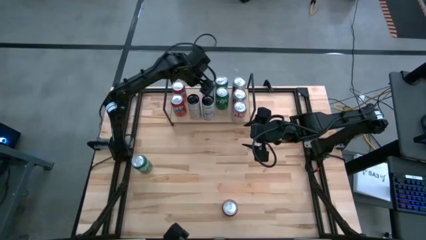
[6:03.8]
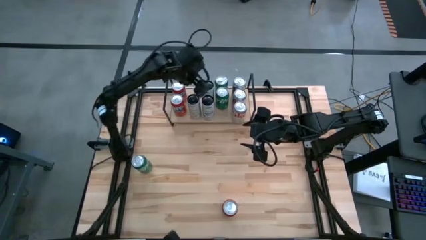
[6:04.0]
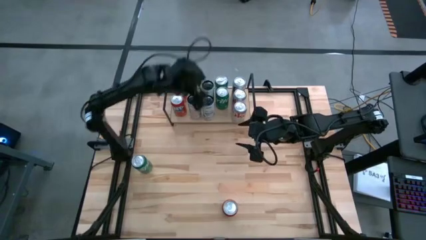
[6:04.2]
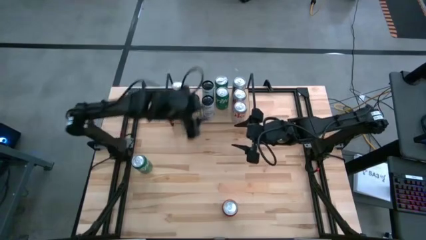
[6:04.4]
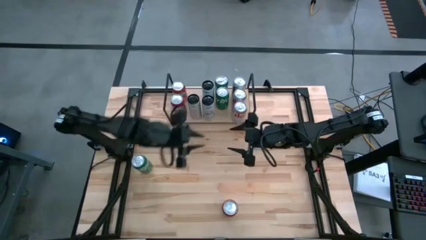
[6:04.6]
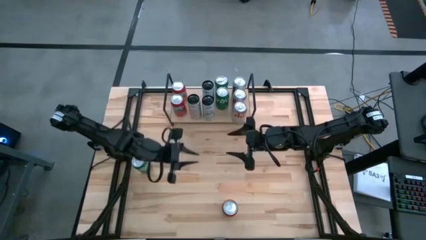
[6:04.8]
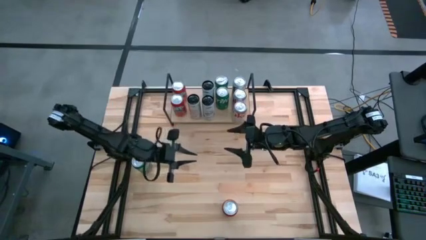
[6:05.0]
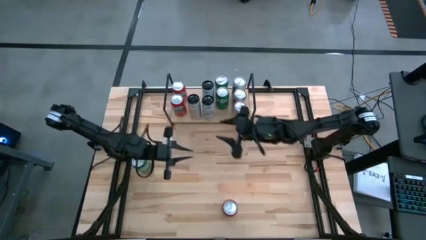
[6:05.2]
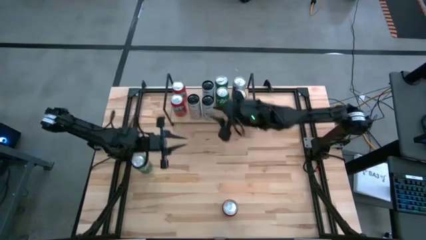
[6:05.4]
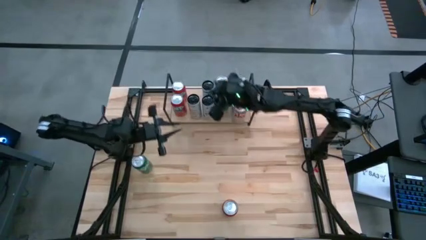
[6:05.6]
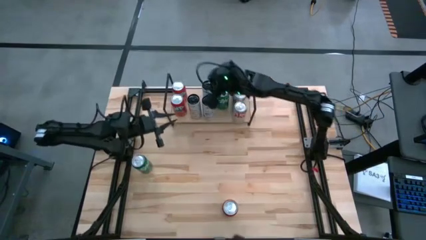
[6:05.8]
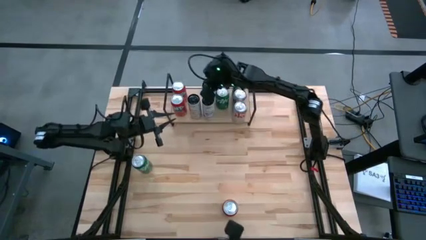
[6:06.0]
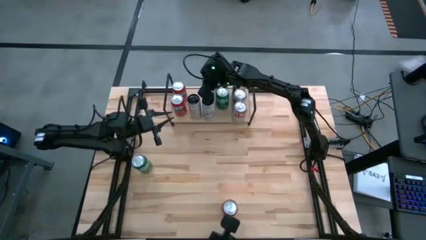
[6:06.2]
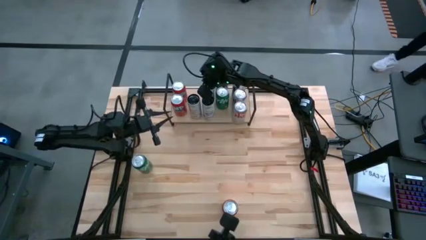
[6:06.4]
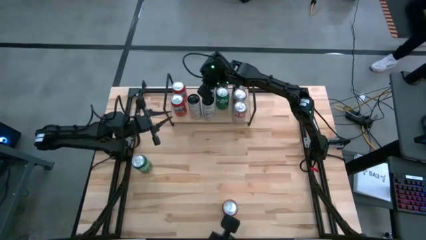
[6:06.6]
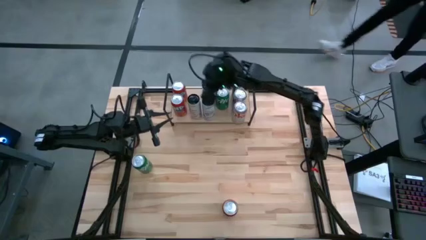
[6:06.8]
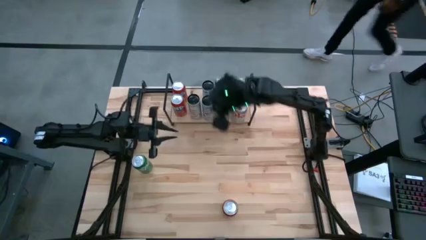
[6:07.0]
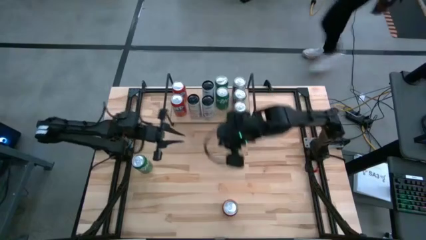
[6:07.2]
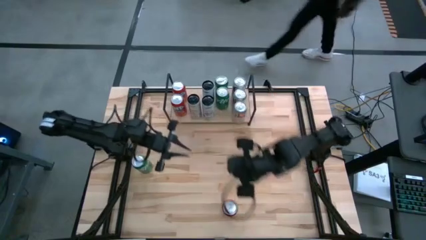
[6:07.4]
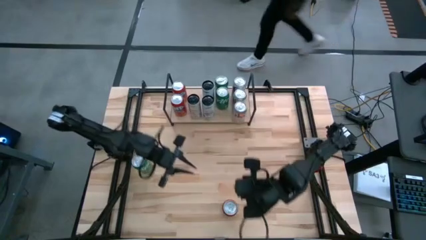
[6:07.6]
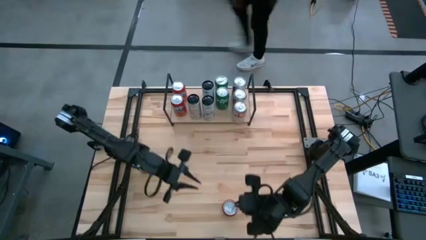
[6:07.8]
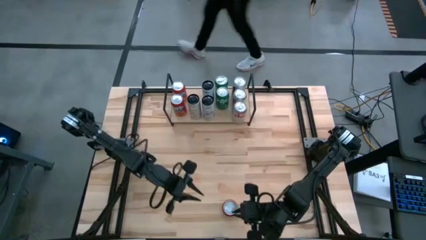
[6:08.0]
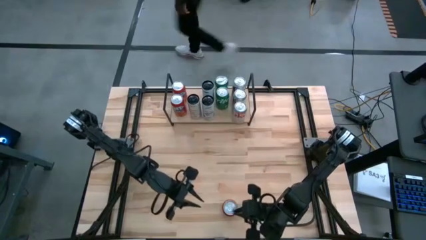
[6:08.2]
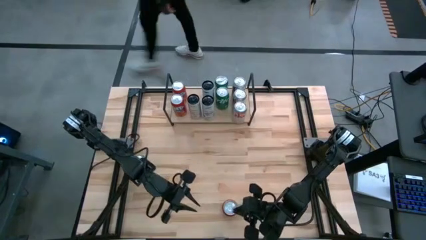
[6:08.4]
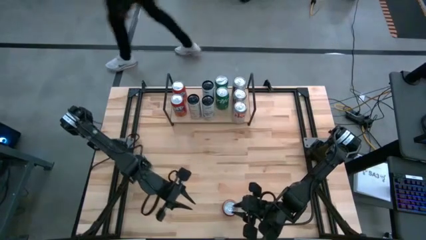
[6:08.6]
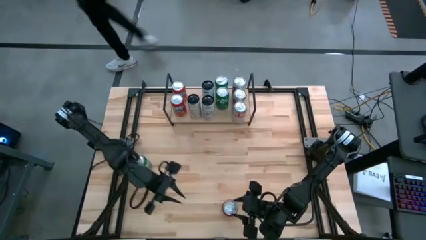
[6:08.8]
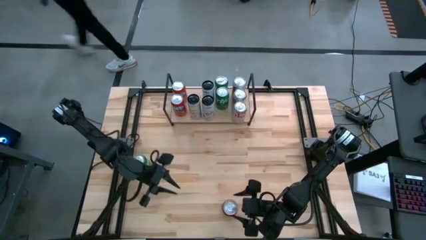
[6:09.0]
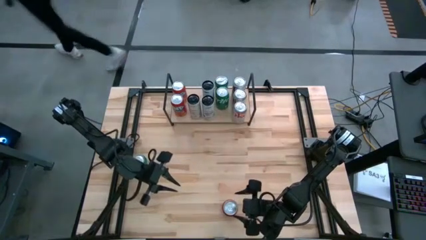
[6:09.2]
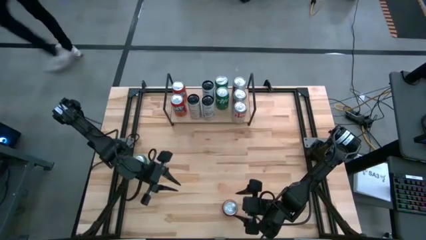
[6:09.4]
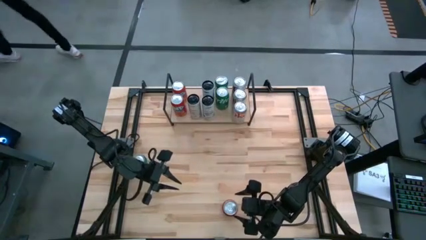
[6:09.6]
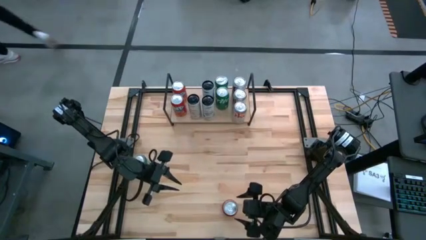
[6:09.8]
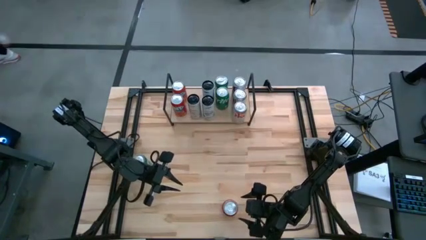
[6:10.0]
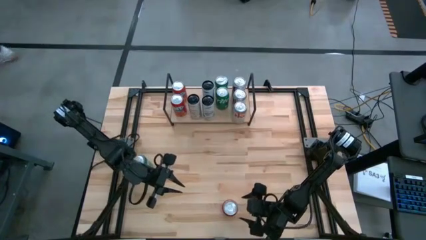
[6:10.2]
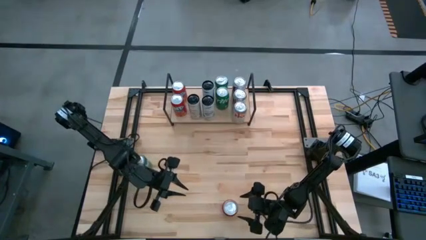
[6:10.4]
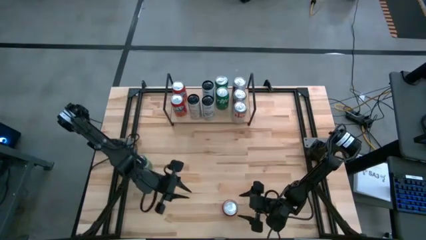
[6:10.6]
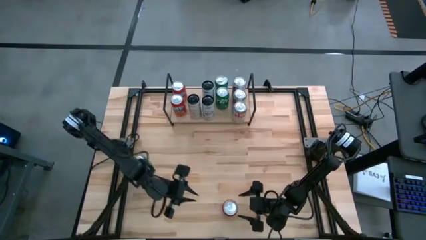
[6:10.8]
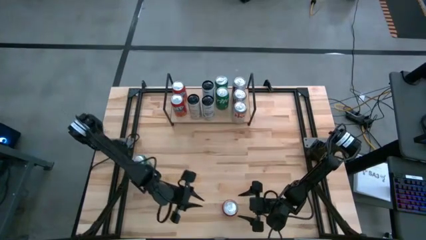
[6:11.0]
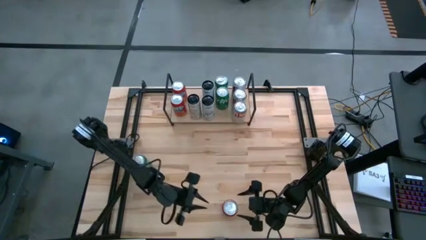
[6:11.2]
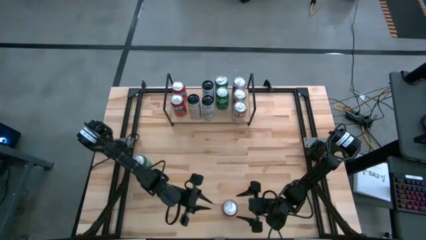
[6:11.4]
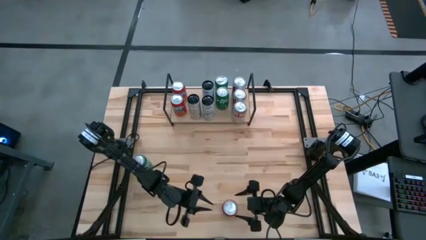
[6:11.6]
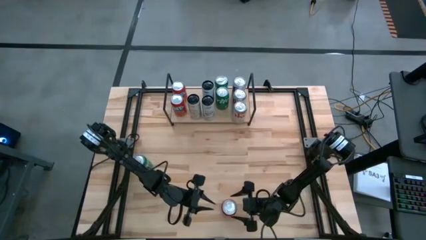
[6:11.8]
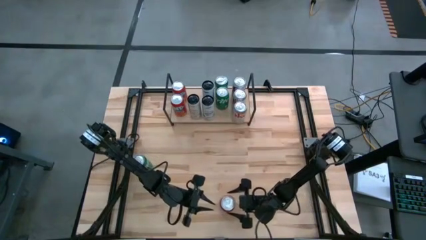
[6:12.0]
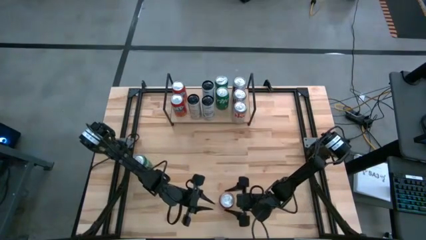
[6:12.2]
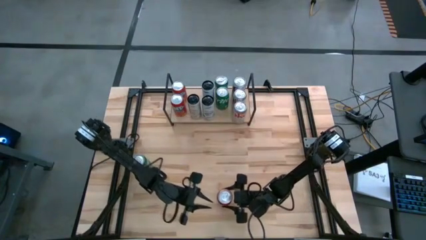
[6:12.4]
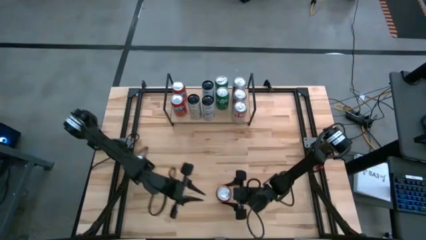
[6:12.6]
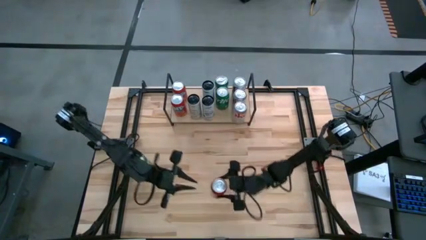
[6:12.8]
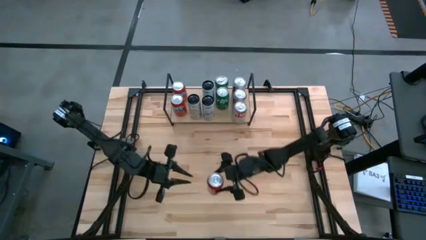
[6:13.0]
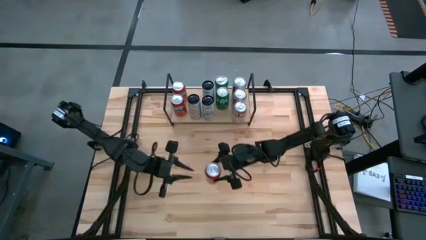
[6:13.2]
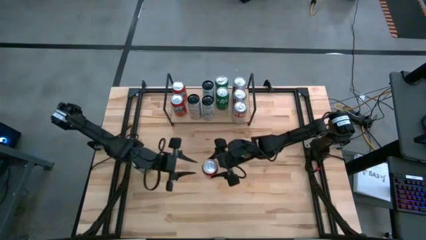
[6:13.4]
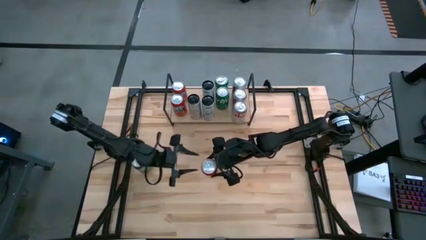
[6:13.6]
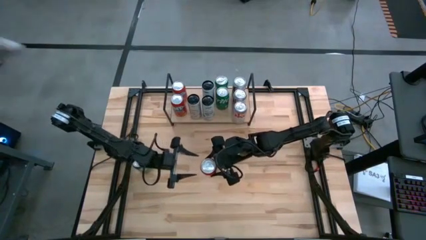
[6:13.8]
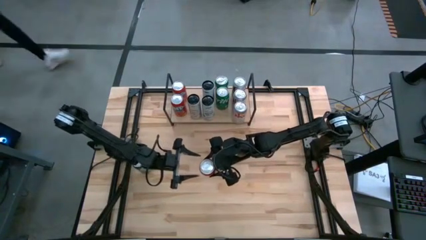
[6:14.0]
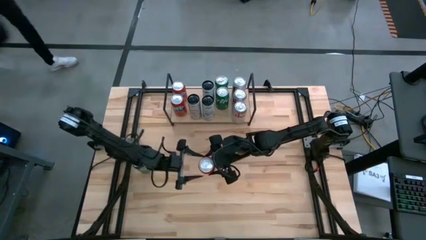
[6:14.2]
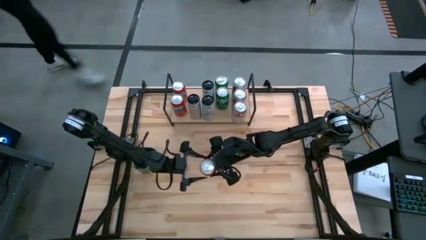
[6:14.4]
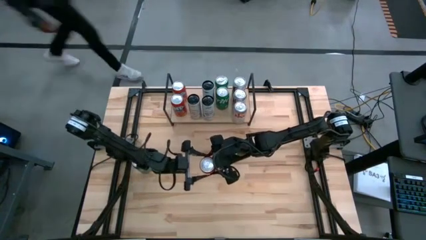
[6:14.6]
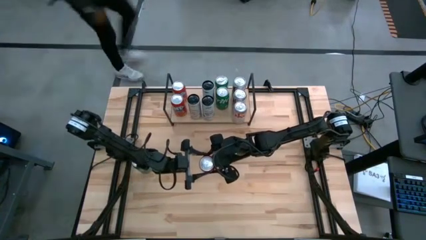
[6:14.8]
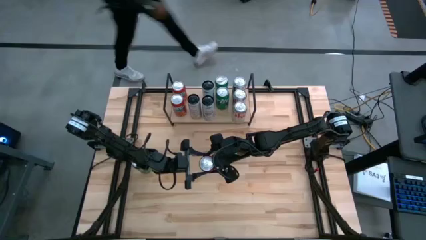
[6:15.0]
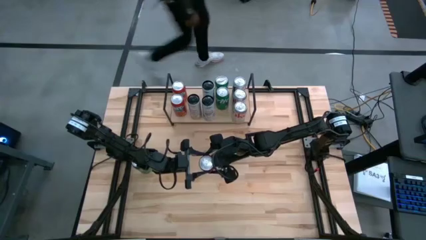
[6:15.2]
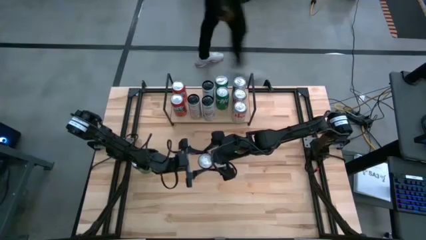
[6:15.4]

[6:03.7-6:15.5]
Task: Sort soda cans
Put the red soda can on the shelf and align it with the other red soda cans
